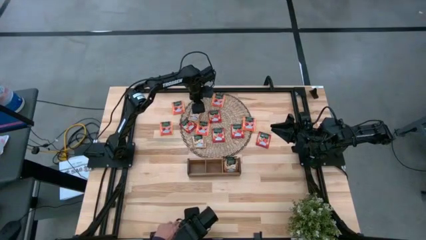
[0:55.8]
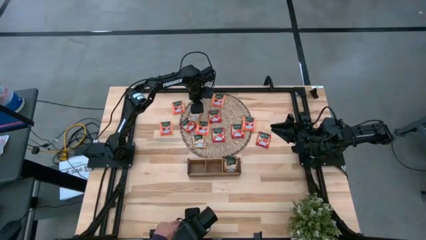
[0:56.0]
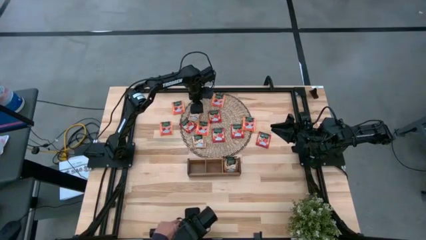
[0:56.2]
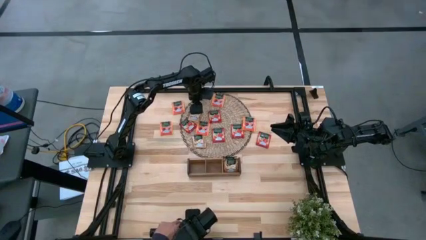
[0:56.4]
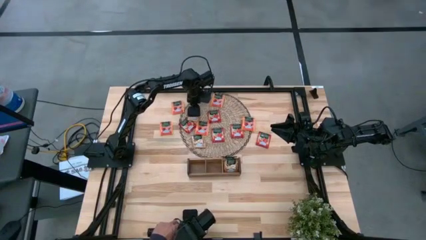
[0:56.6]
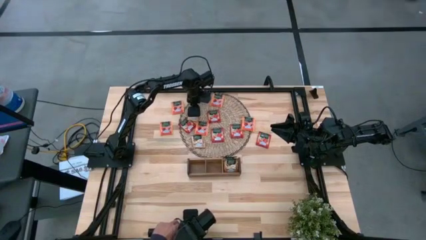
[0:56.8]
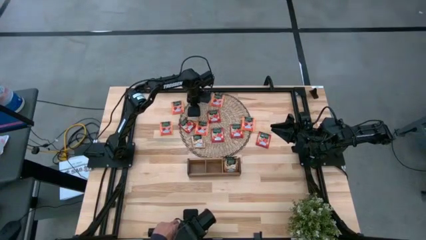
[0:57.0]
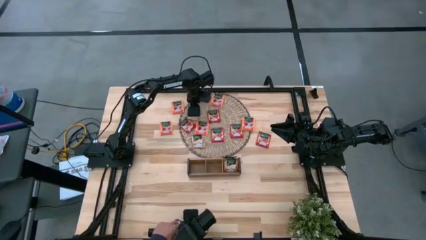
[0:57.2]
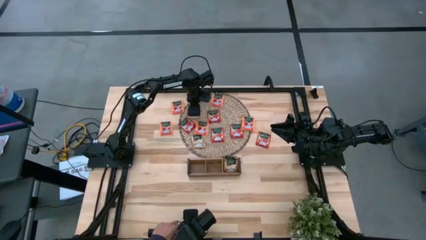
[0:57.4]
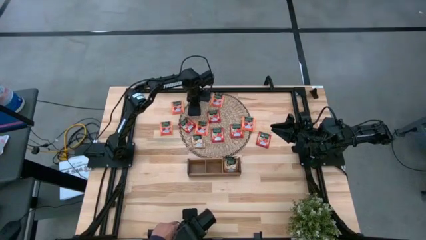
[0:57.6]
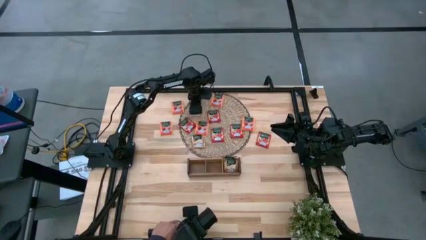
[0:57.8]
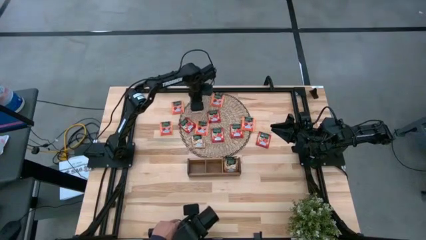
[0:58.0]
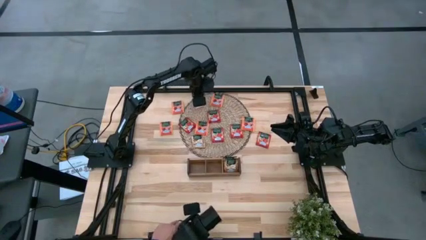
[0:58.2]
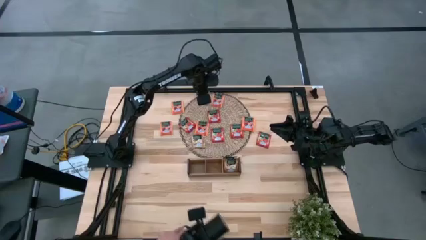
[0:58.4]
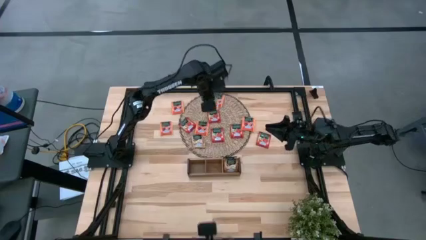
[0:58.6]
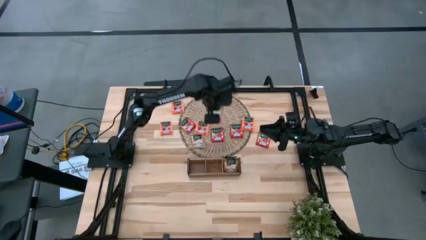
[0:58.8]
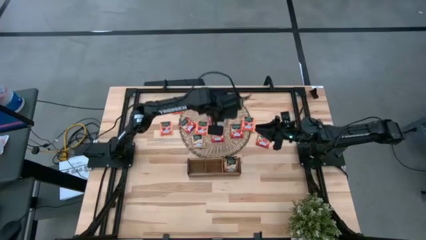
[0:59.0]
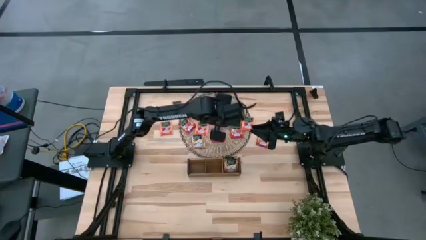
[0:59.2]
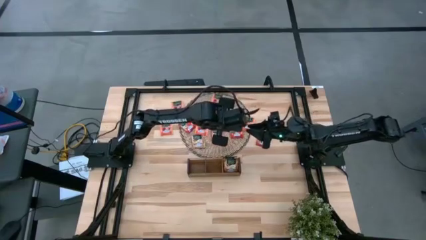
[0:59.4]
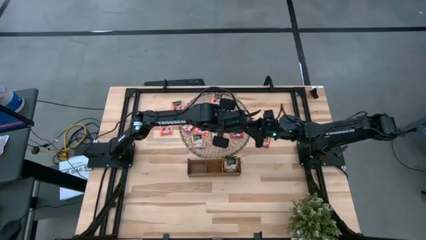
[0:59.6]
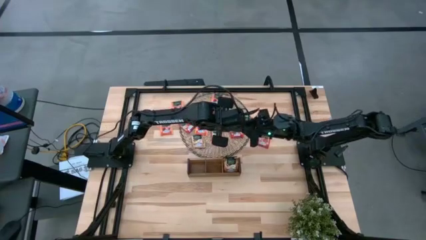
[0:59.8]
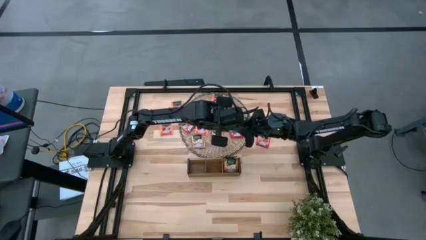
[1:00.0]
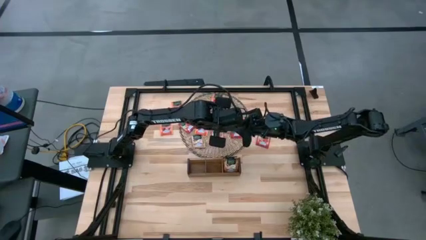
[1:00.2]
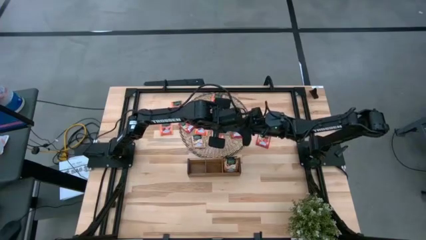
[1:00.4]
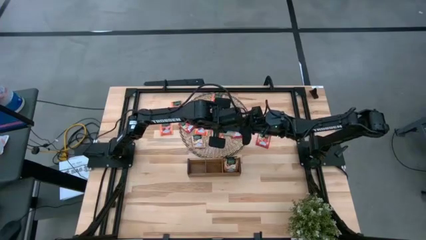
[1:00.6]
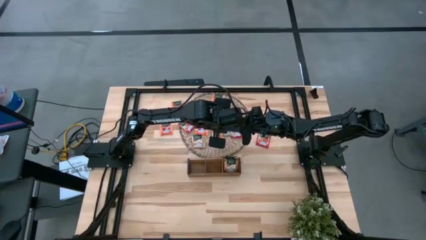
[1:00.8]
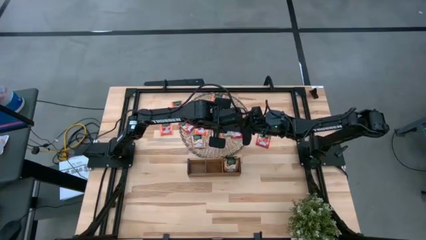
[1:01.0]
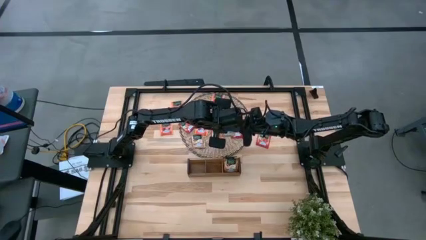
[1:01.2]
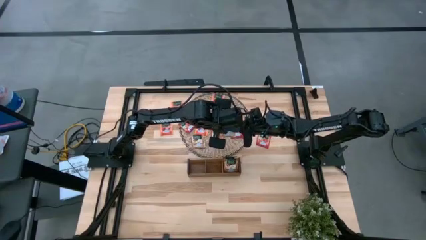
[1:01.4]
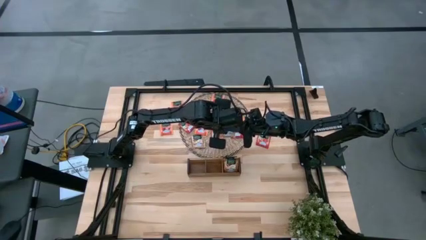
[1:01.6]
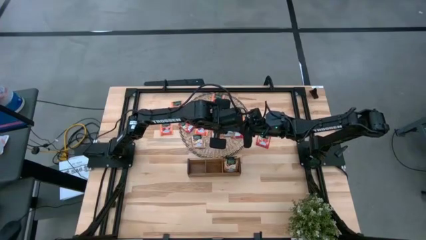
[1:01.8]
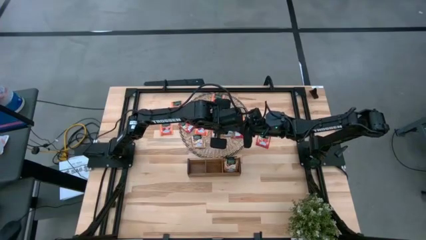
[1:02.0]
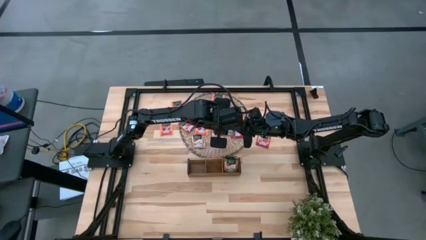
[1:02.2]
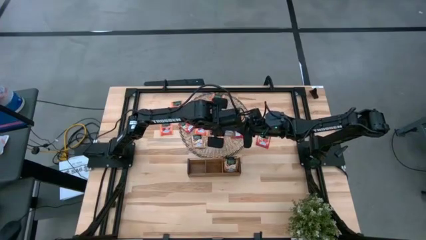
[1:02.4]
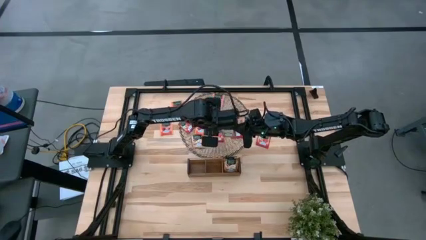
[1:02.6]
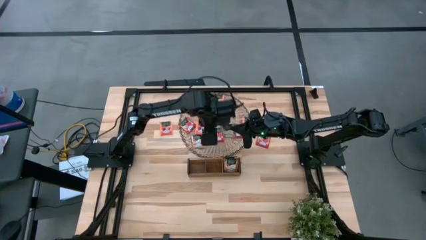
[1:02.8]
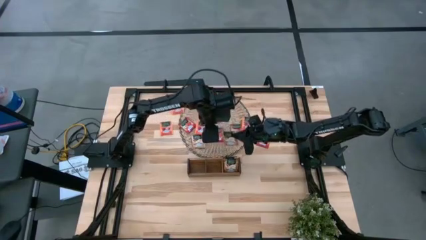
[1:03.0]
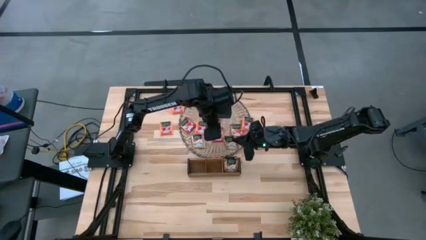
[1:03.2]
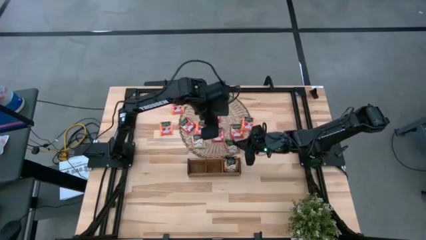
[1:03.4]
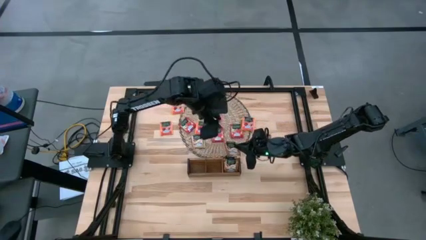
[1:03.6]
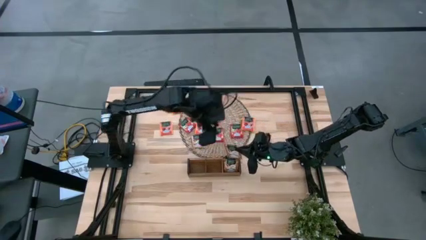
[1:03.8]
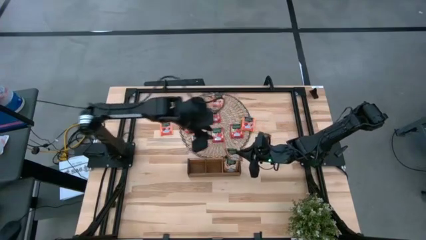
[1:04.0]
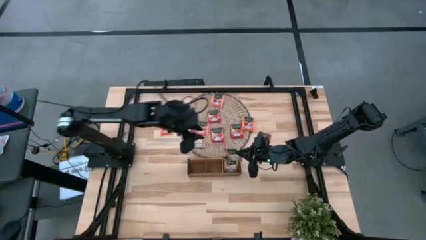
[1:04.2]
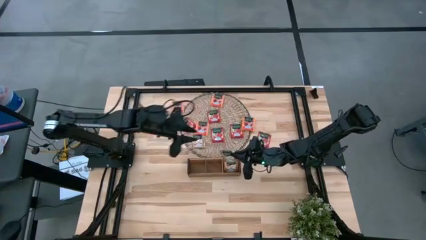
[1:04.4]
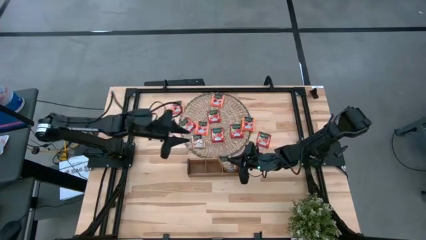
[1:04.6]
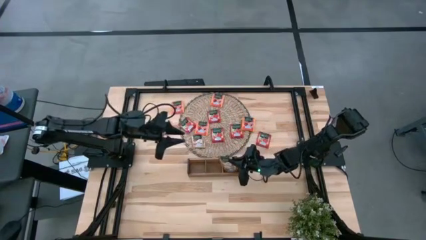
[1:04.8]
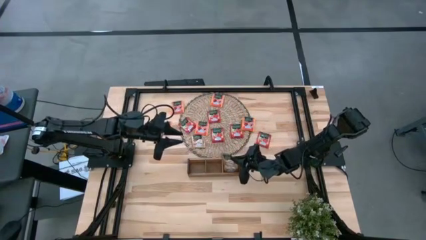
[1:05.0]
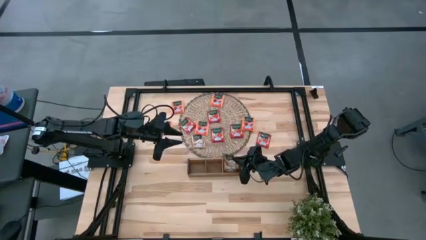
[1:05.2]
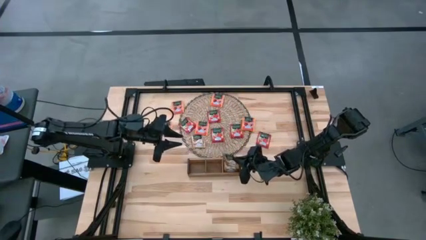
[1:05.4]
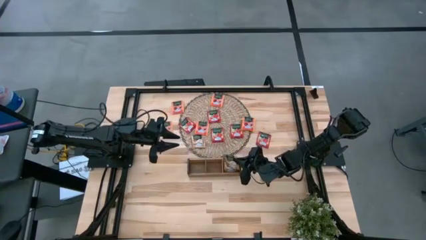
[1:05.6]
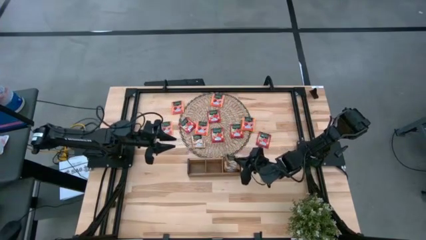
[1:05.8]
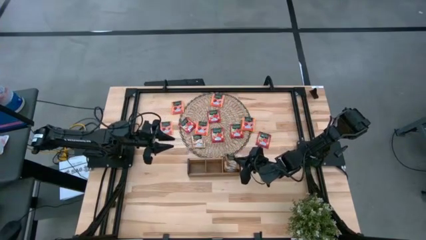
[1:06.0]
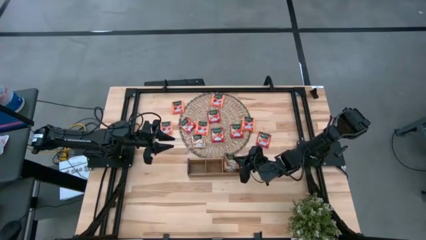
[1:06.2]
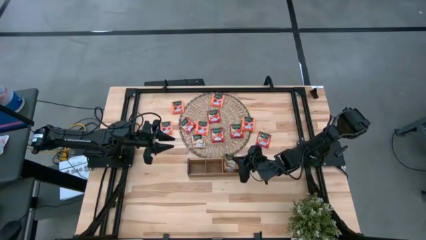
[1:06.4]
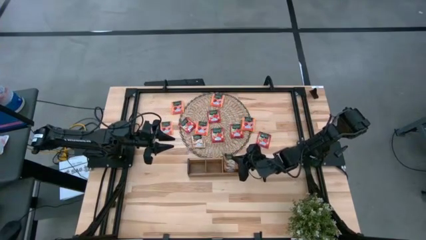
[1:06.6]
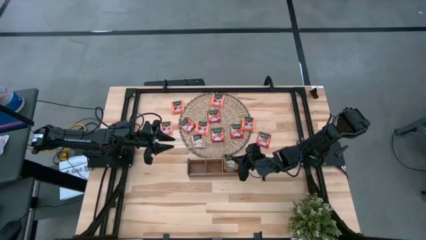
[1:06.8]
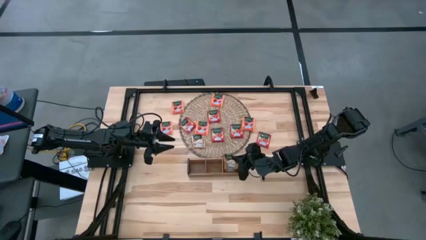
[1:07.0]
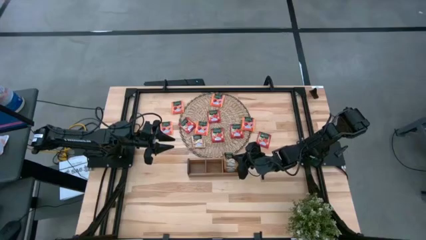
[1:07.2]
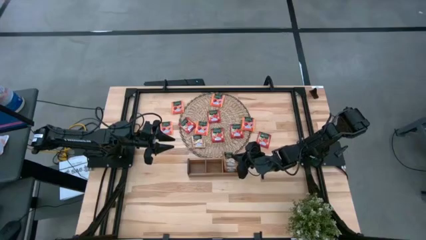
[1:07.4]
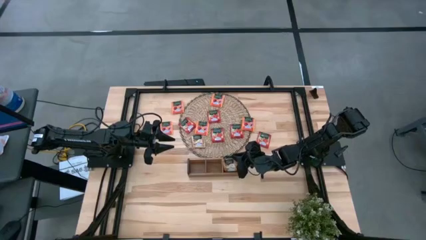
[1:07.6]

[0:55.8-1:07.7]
Task: Pick & Place Tea
Put the gold tea bag into the right section of the wooden organizer
